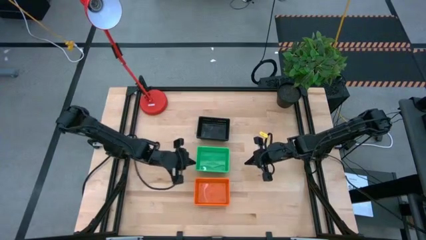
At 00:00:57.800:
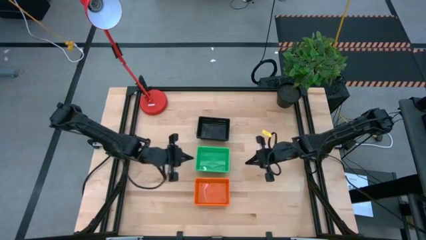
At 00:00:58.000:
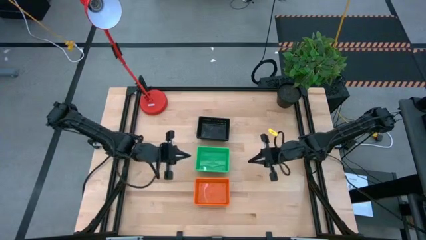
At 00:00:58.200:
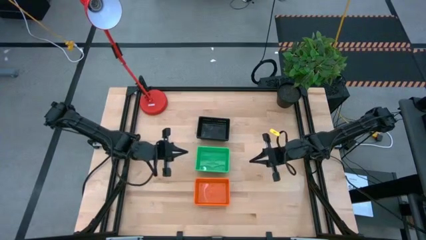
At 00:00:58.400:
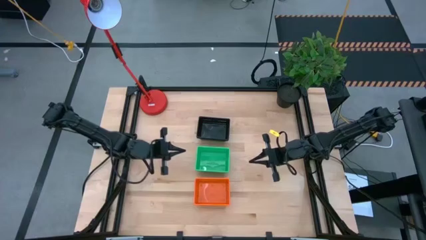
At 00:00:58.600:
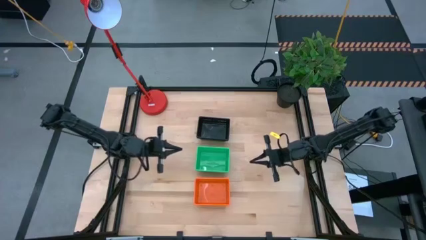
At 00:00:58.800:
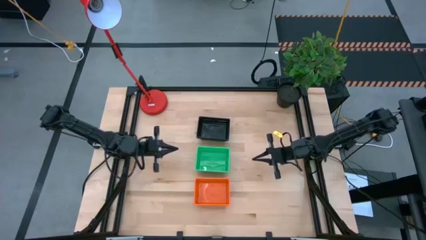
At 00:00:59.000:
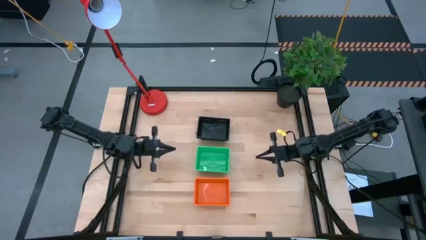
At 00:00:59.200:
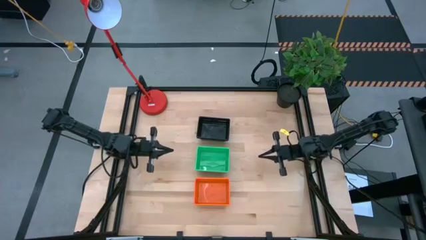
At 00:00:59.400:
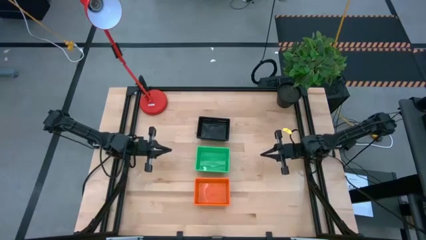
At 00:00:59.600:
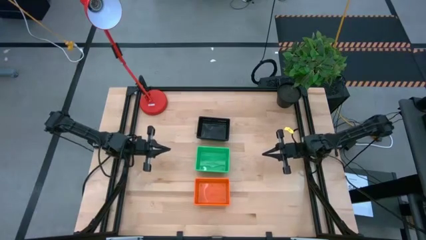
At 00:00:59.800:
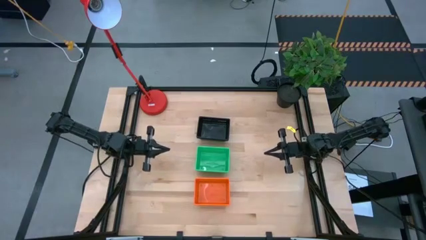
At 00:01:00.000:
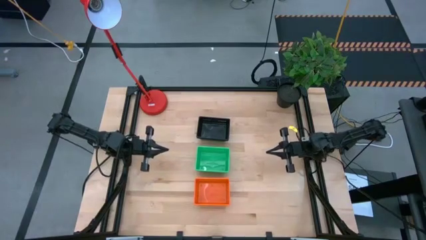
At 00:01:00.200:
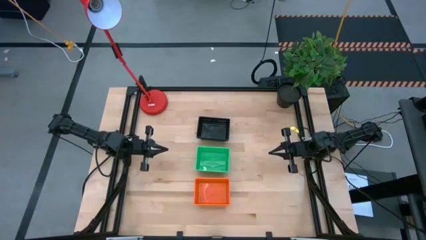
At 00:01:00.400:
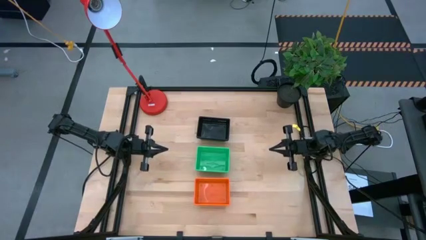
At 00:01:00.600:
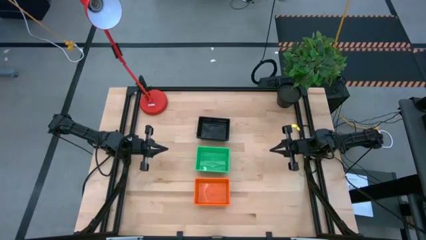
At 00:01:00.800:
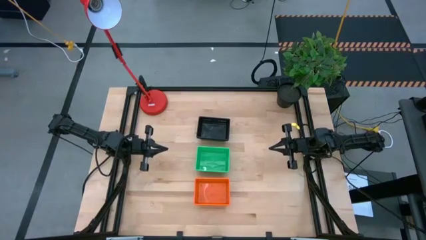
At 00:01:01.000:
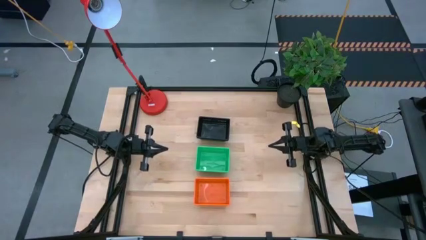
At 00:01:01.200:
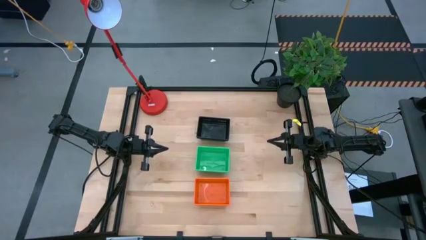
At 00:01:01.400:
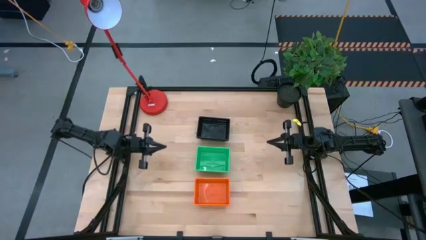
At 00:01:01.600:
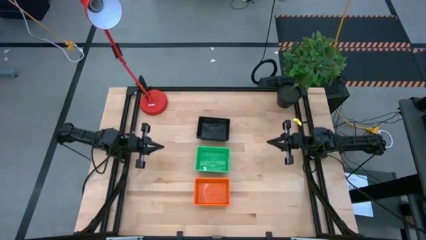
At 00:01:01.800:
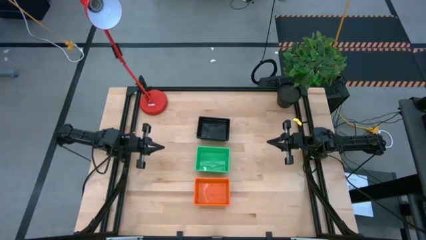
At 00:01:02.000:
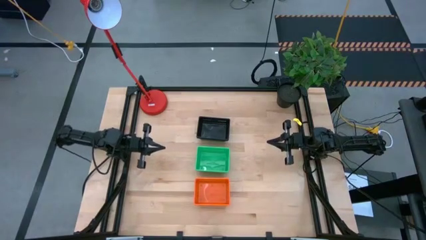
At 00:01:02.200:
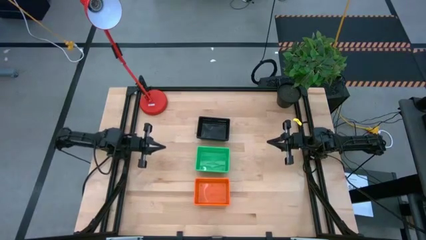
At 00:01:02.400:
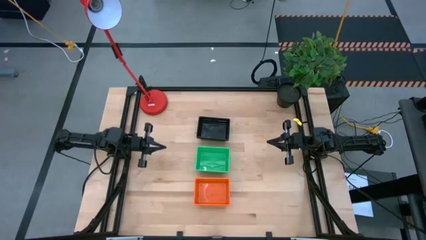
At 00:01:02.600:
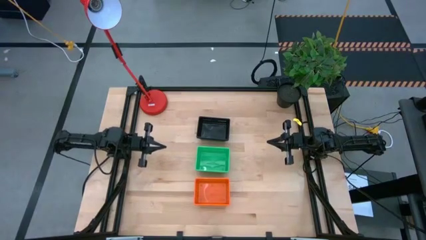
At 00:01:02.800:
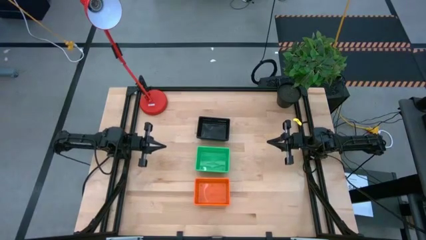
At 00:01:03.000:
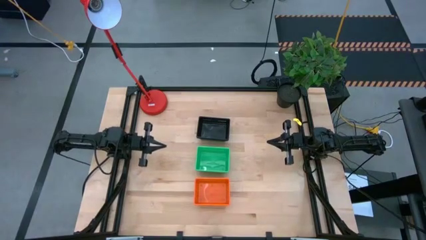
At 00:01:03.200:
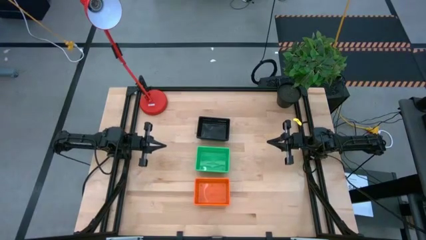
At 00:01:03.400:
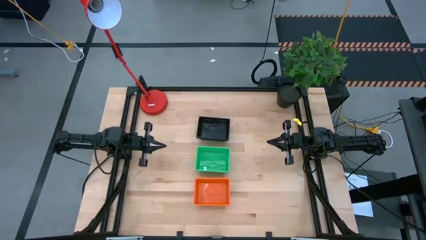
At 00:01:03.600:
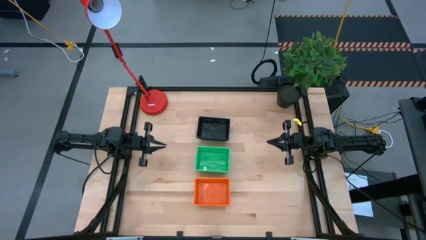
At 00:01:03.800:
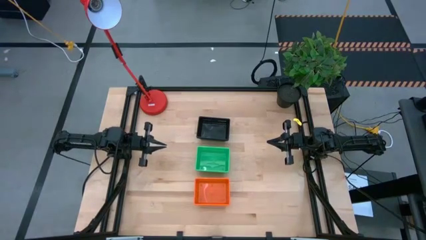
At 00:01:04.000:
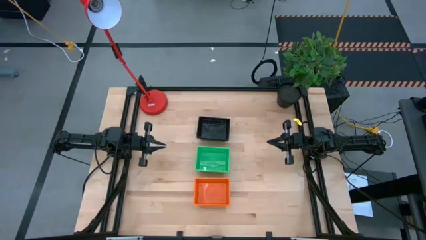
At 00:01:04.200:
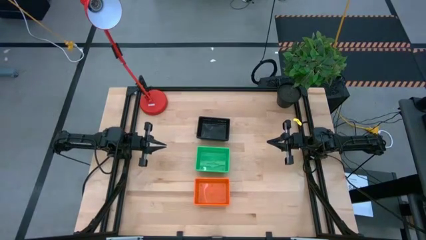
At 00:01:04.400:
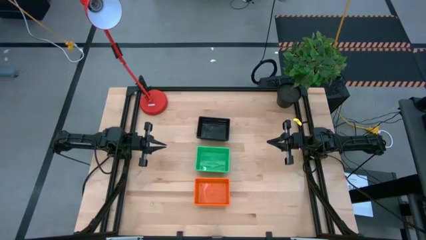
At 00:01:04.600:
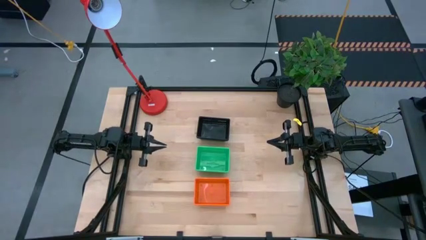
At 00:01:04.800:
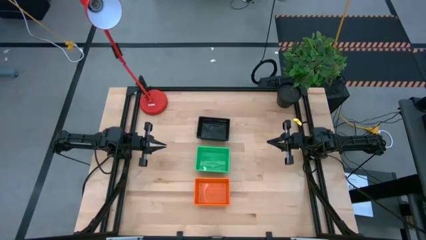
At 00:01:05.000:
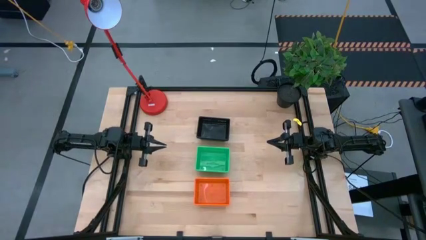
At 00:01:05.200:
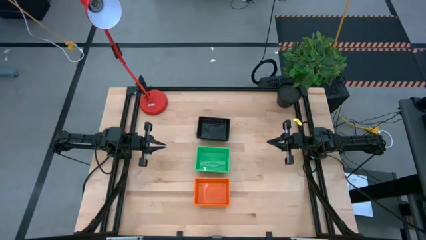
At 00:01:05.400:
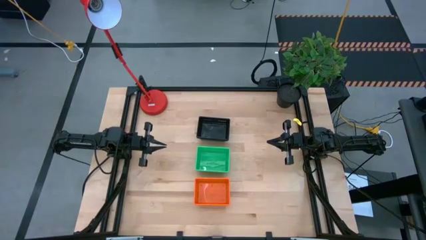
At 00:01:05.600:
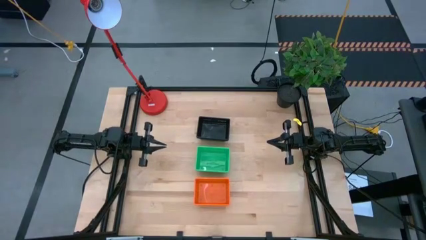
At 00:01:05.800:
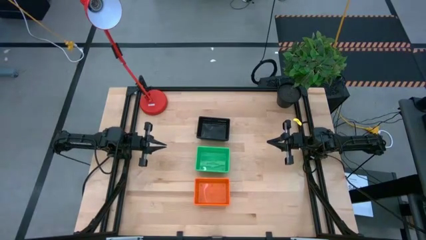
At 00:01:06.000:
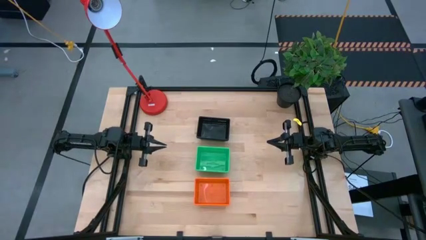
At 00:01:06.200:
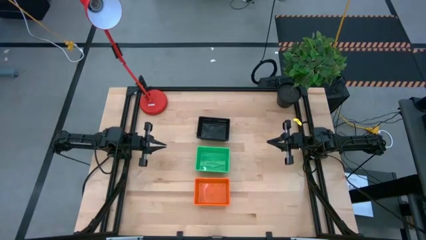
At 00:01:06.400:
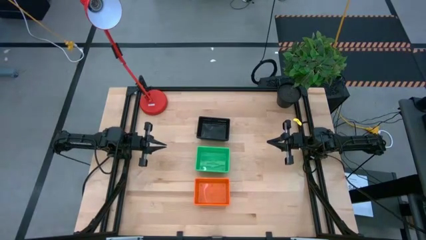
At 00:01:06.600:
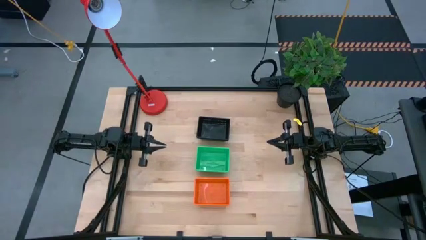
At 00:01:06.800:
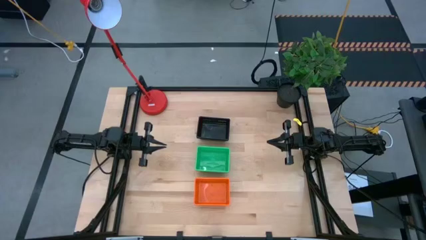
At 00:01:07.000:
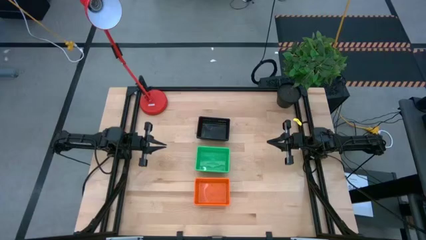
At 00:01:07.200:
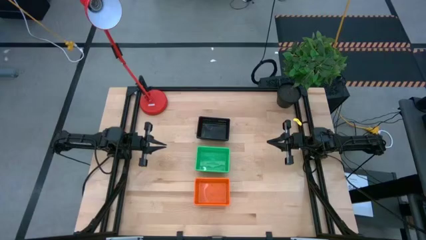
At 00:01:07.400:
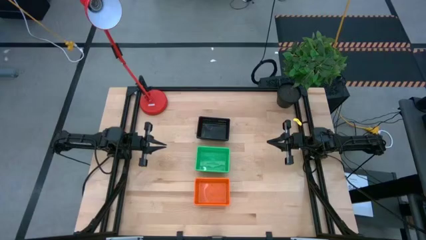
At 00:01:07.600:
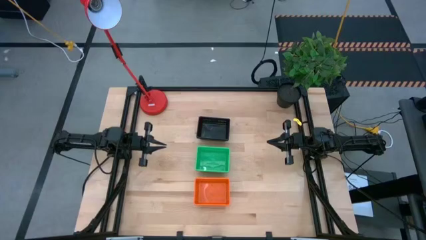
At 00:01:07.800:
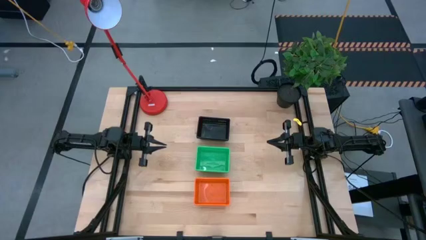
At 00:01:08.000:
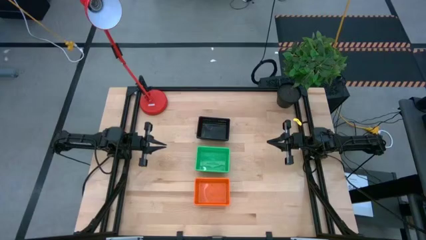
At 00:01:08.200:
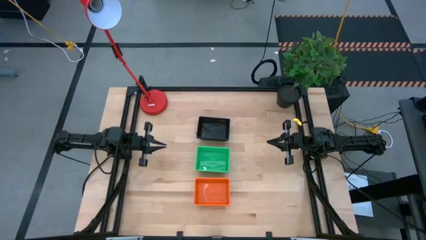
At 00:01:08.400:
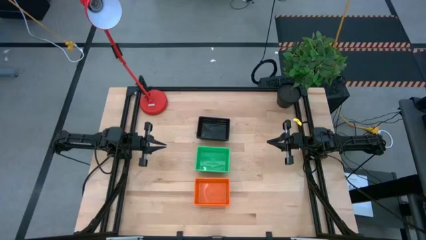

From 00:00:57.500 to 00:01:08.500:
Return to Home Position

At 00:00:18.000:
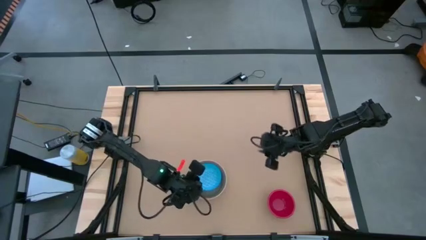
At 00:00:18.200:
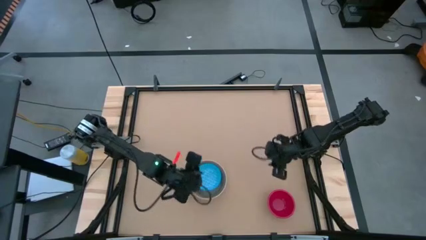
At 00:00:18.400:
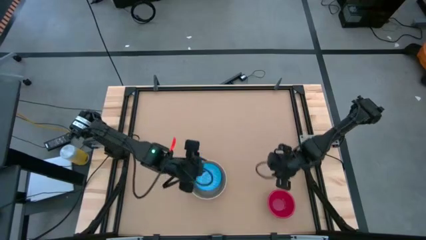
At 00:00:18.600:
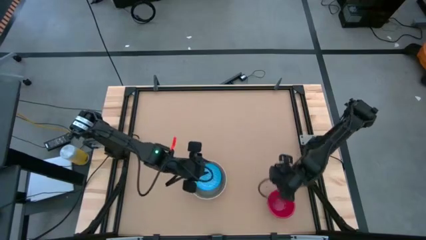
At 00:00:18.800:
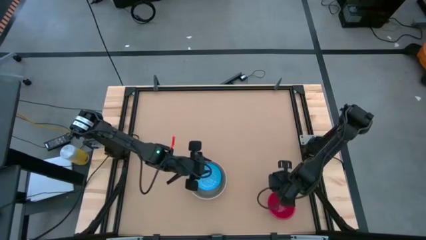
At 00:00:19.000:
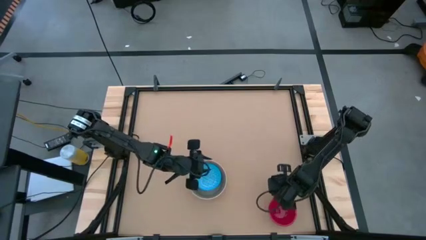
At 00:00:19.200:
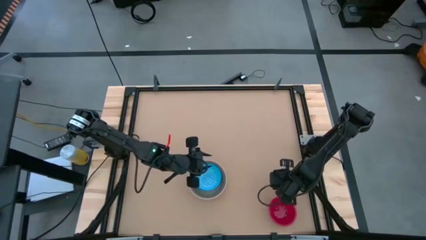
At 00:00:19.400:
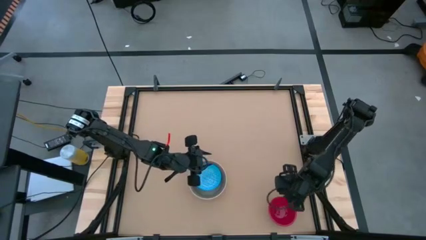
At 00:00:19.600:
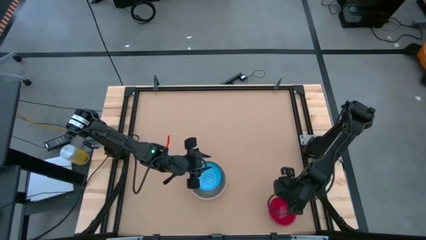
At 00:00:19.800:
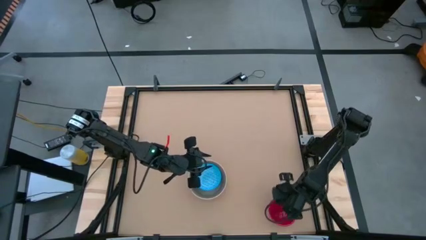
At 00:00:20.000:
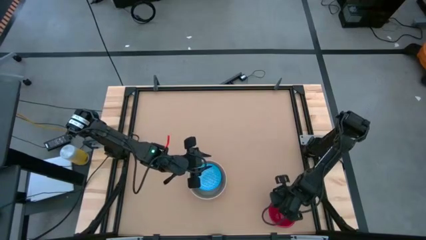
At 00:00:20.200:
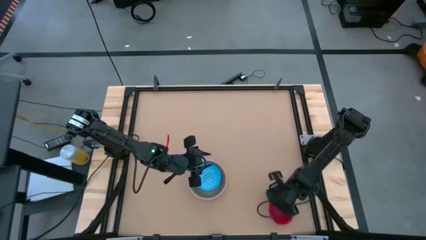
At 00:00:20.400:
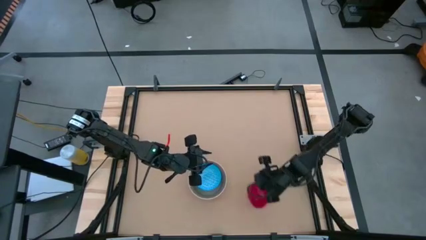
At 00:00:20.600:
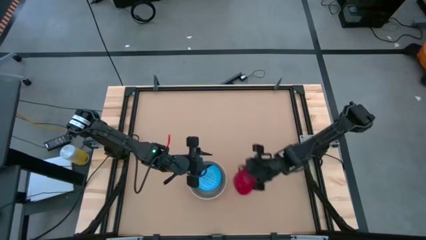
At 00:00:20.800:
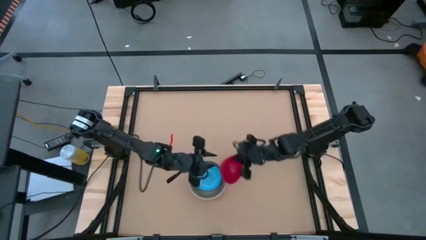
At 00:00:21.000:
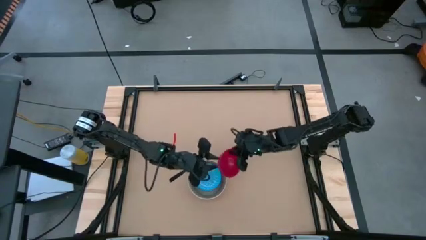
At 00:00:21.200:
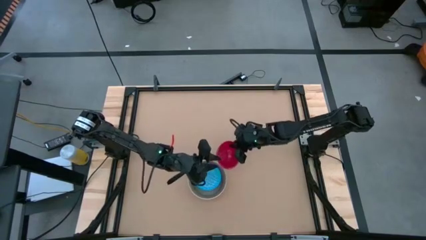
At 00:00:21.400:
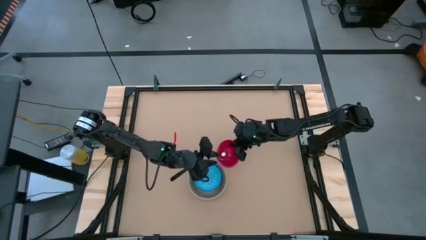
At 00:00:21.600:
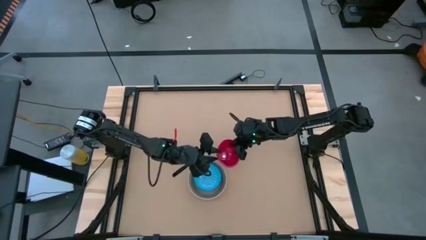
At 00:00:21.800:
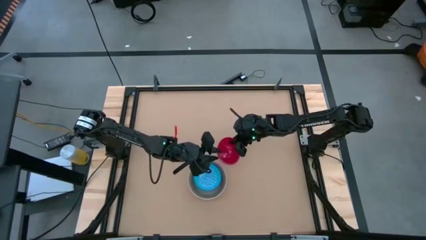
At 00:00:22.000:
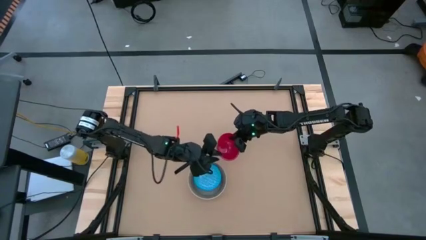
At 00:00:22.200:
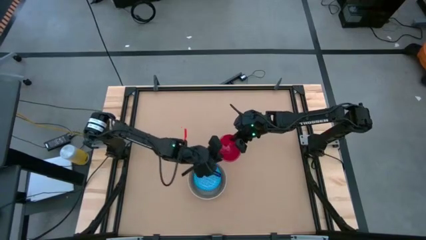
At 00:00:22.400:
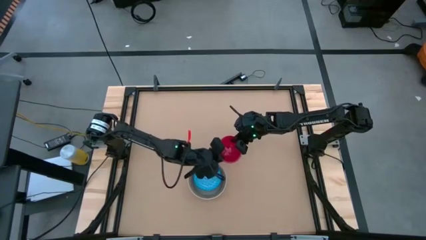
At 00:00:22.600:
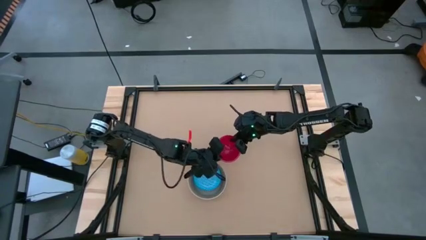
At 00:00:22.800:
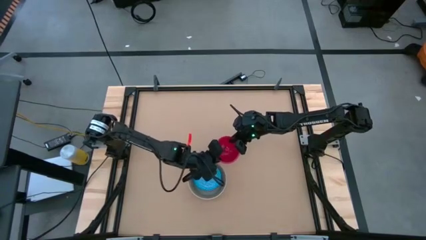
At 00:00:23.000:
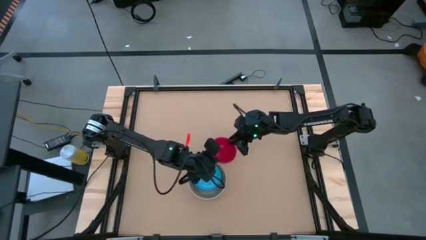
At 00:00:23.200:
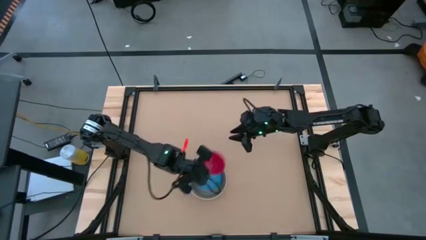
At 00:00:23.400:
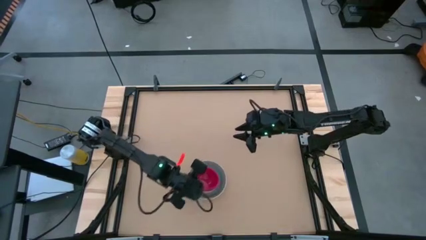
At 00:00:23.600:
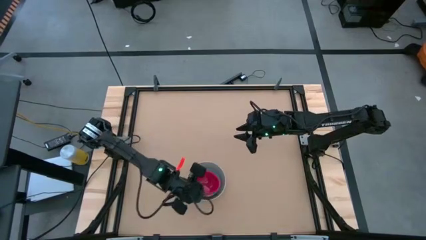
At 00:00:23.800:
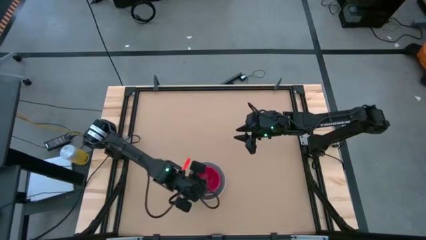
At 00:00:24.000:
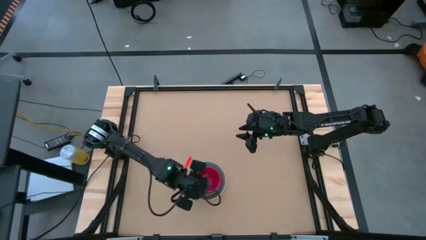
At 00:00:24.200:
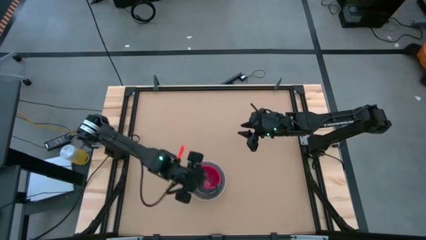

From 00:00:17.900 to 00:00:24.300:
Stack the red bowl on the blue pattern bowl
